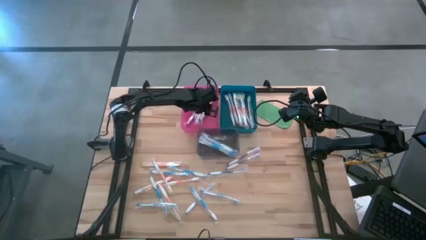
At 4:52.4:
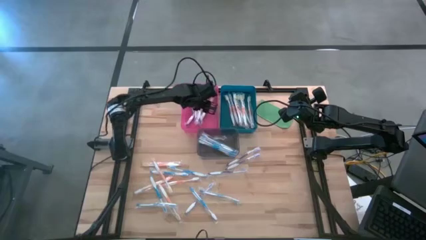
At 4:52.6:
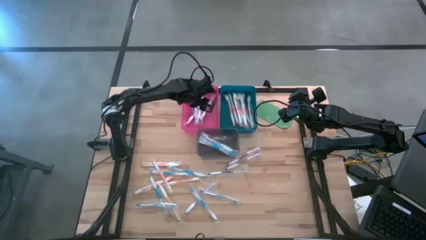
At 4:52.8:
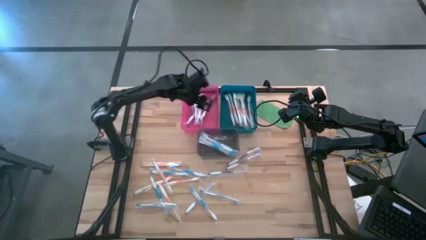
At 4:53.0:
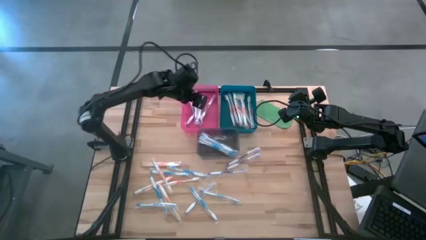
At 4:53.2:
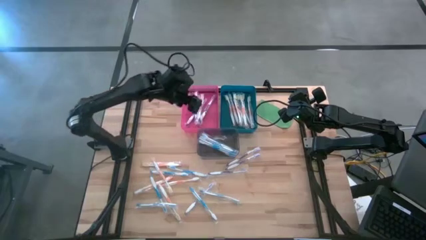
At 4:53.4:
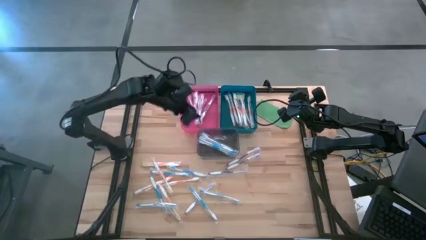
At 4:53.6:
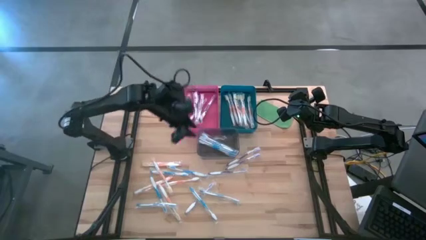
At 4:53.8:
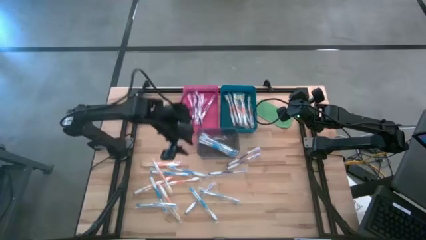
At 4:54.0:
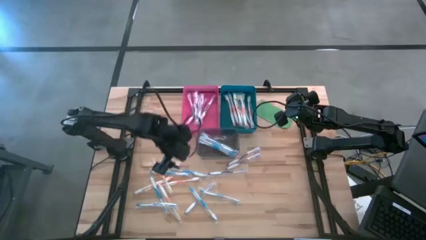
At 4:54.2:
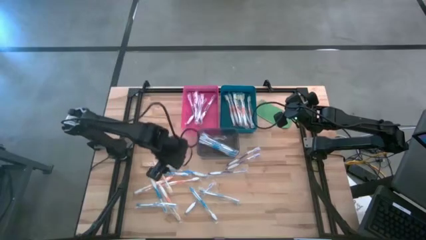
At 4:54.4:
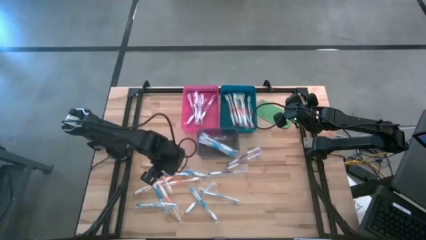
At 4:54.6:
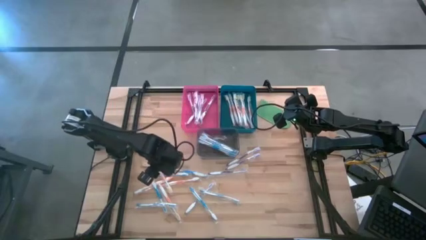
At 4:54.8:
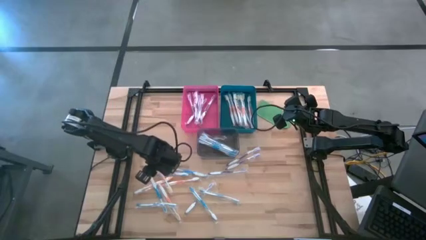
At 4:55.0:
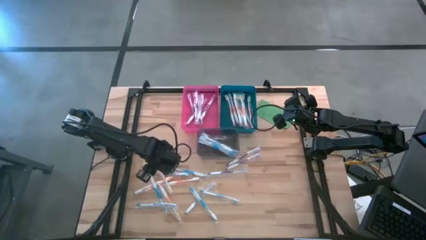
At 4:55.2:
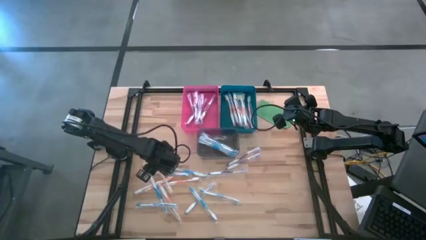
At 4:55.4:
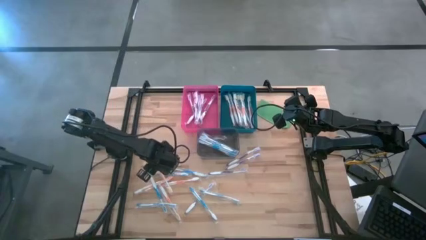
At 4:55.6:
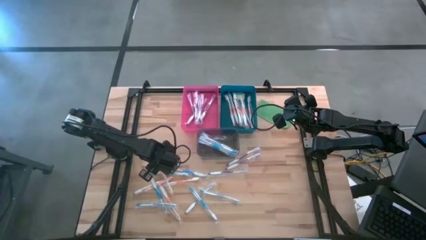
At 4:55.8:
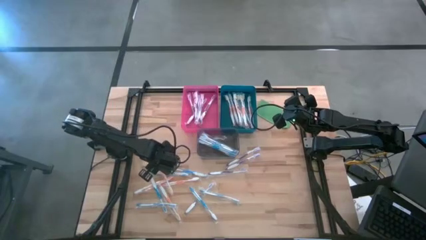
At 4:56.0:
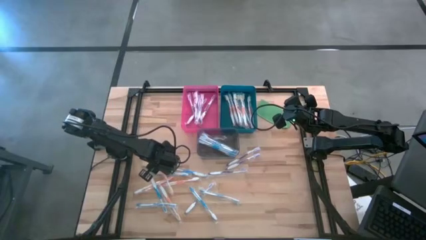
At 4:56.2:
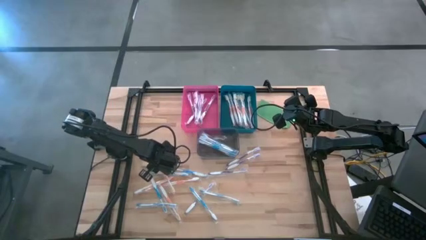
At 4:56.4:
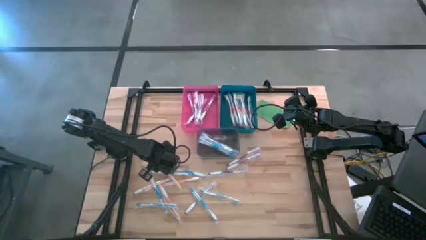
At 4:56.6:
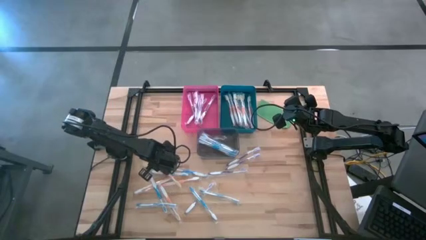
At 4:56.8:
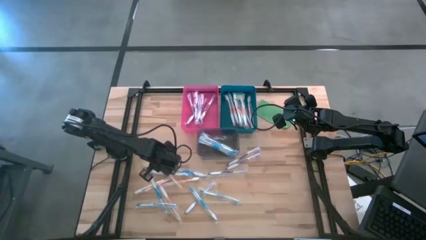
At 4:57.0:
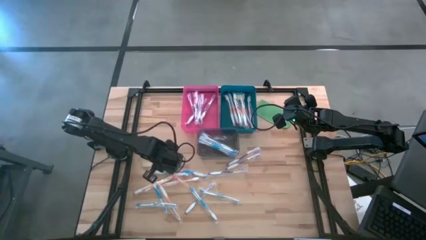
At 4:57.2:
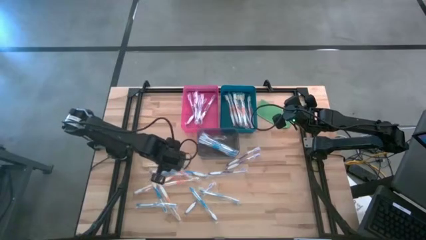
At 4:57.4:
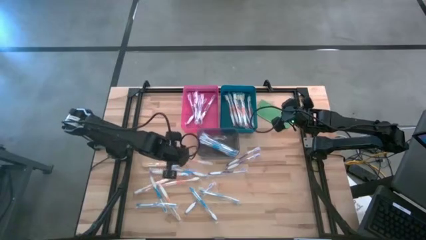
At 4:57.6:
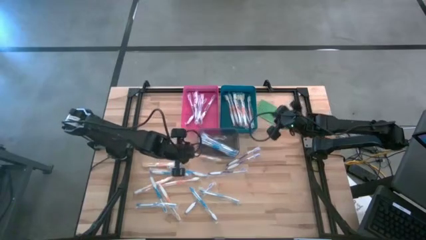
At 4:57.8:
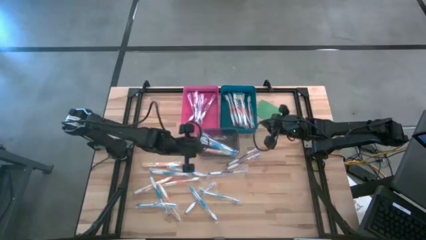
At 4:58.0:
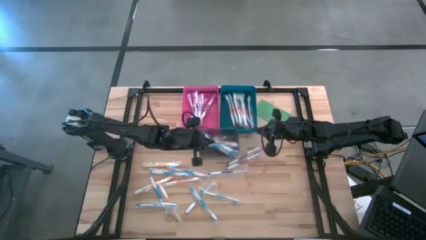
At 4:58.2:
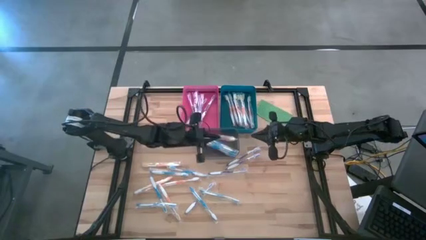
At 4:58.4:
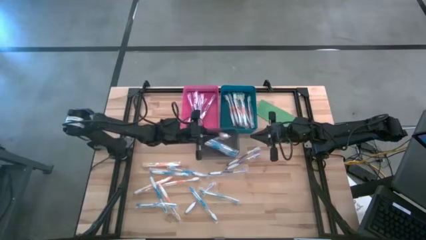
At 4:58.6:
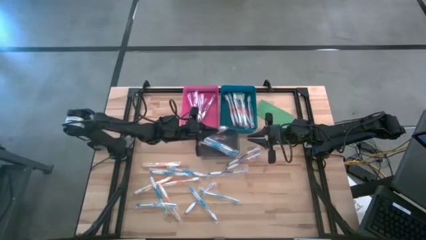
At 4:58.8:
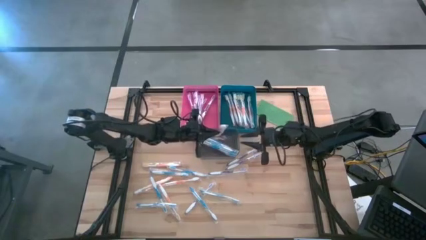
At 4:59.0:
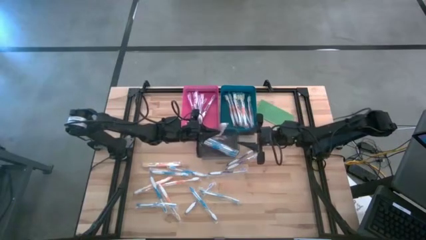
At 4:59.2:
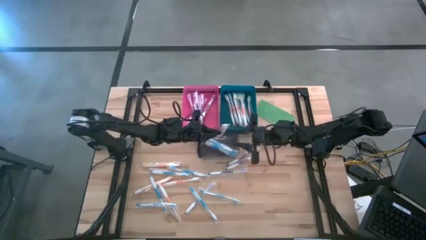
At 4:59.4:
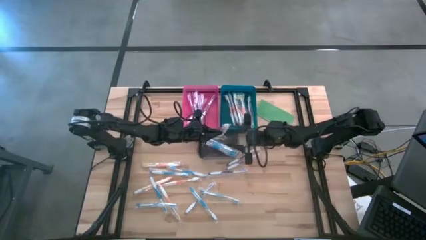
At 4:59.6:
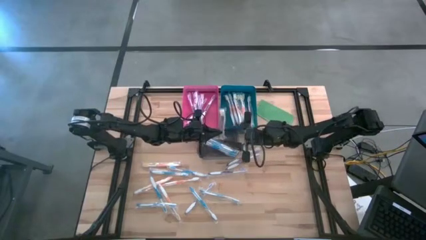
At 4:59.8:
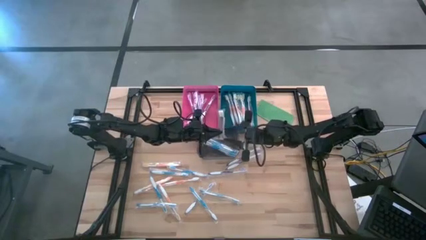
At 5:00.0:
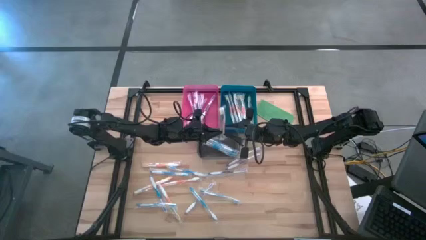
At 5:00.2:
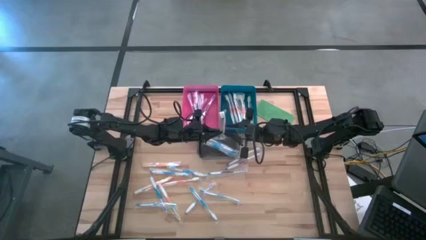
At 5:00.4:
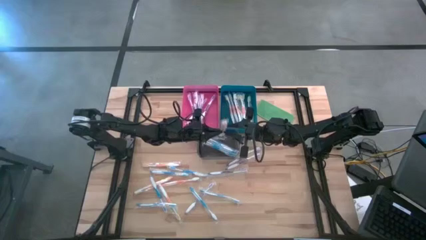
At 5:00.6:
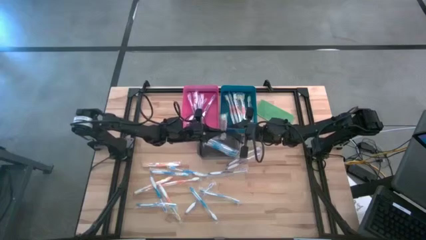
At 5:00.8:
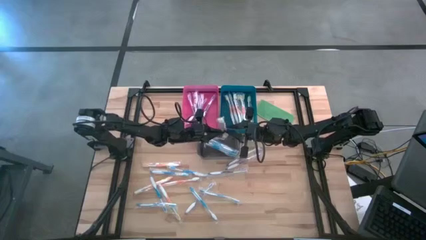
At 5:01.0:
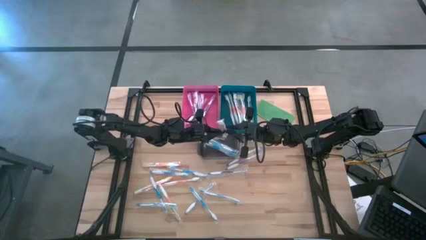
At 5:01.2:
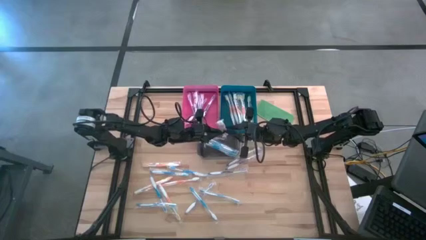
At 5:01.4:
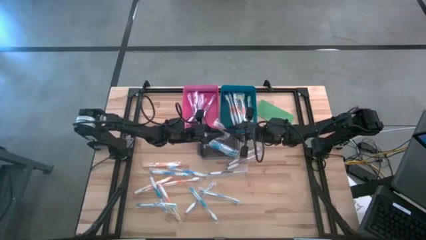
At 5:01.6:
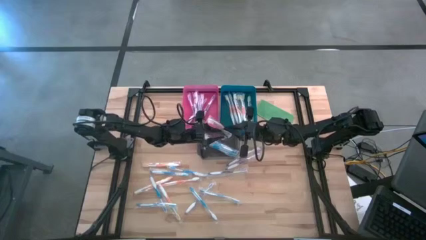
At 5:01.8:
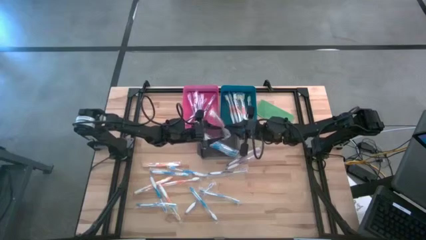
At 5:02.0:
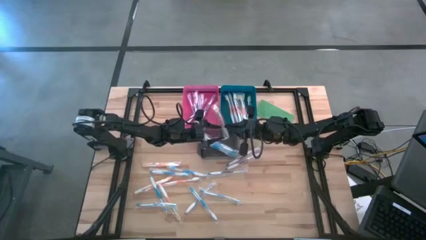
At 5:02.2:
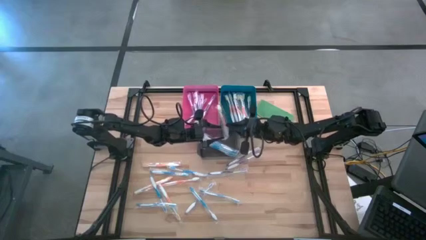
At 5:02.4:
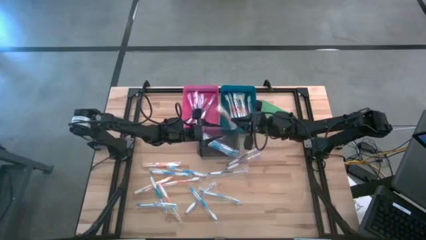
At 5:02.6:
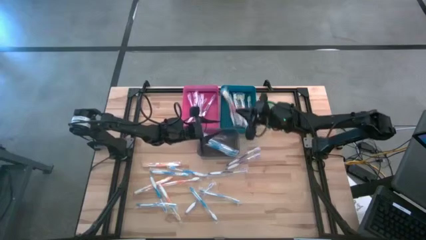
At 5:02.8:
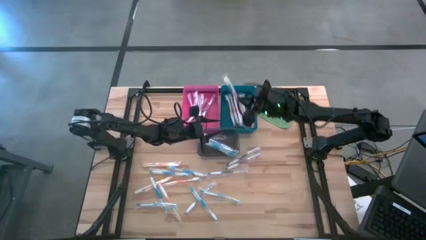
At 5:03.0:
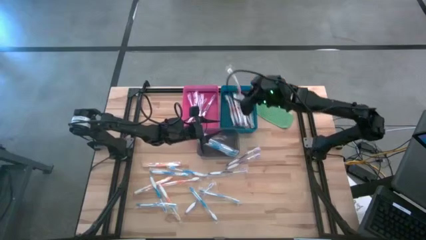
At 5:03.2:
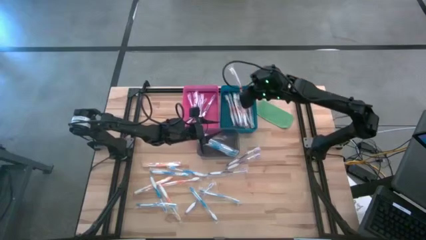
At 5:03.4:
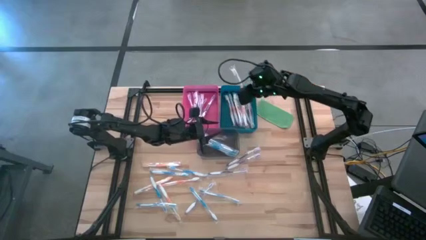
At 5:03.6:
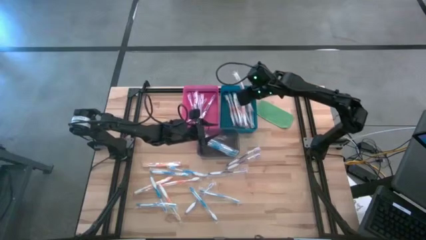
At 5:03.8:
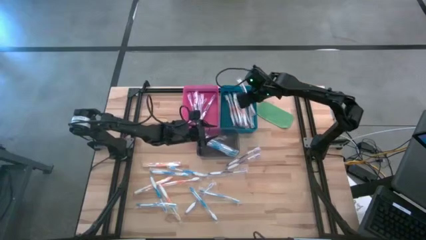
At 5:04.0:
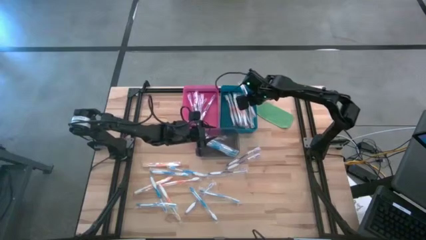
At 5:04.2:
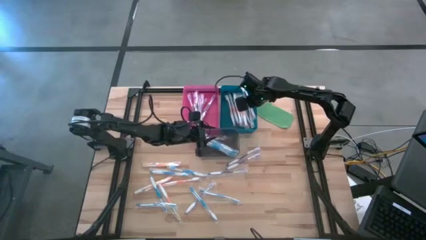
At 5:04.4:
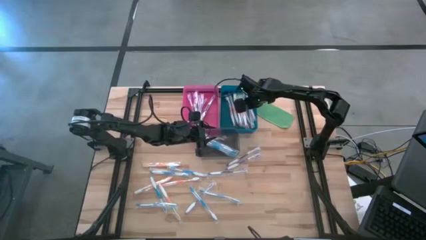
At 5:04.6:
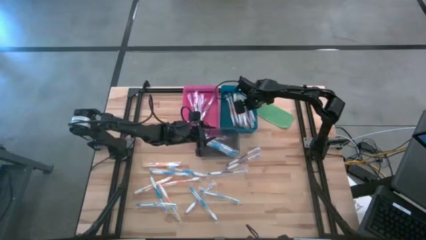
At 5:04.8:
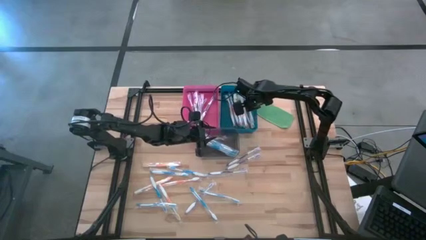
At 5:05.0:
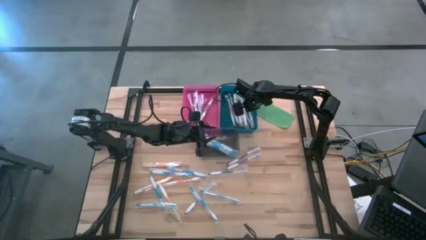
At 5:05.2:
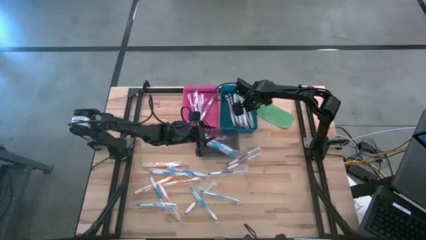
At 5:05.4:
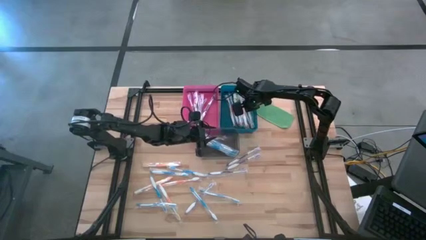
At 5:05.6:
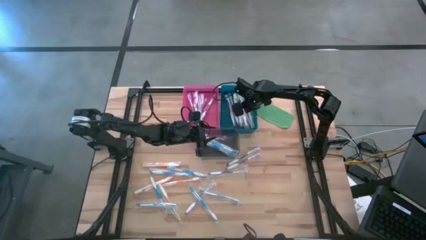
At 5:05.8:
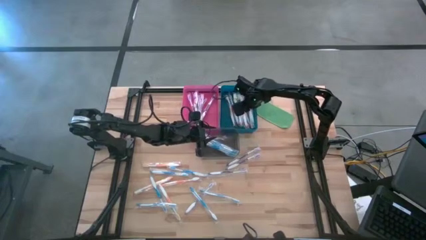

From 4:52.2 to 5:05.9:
Task: Pick & Place Toothbrushes
Put the orange toothbrush into the blue bin

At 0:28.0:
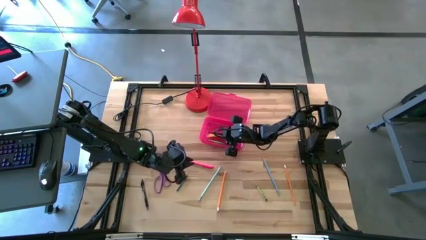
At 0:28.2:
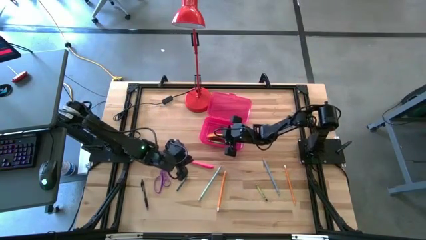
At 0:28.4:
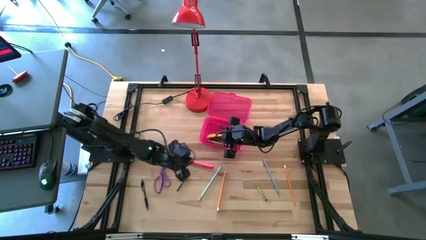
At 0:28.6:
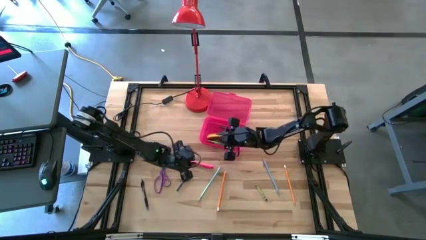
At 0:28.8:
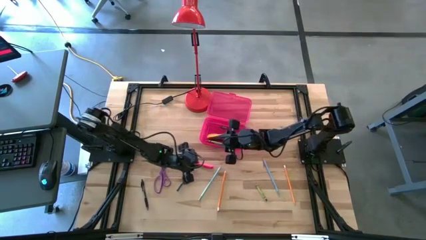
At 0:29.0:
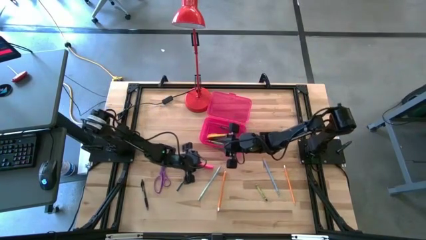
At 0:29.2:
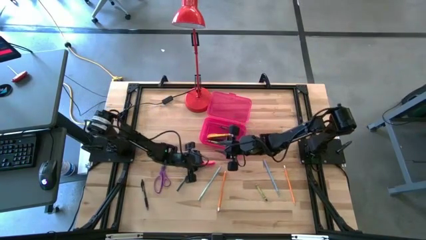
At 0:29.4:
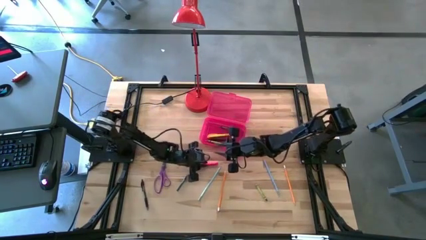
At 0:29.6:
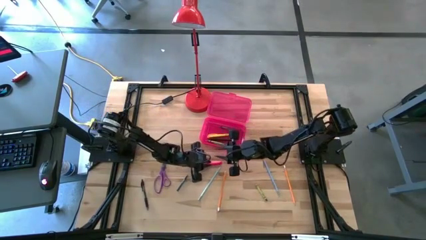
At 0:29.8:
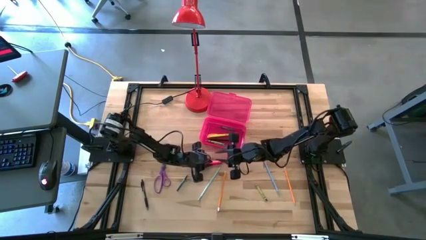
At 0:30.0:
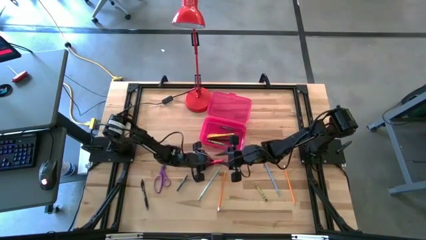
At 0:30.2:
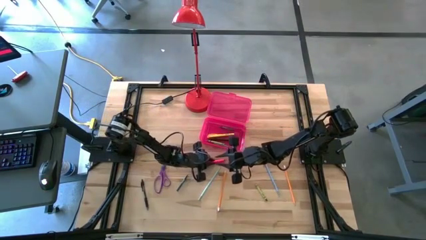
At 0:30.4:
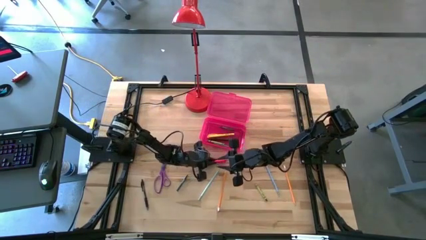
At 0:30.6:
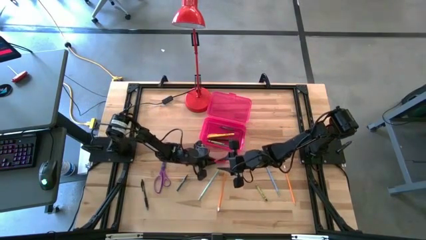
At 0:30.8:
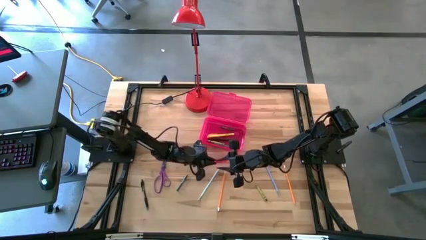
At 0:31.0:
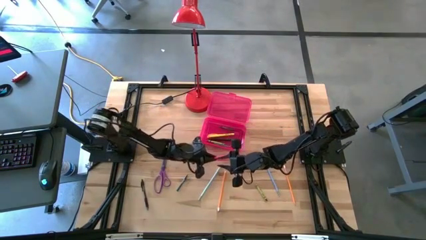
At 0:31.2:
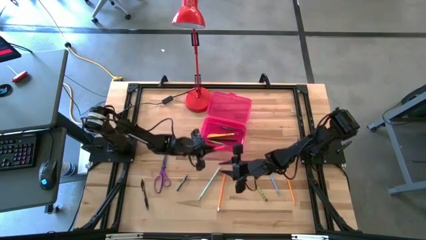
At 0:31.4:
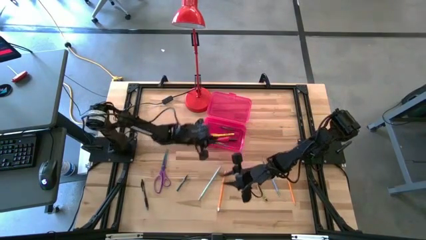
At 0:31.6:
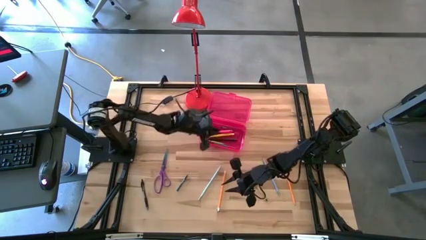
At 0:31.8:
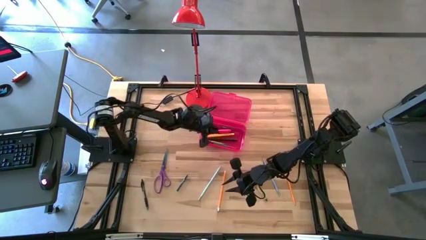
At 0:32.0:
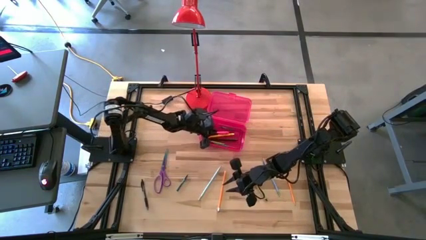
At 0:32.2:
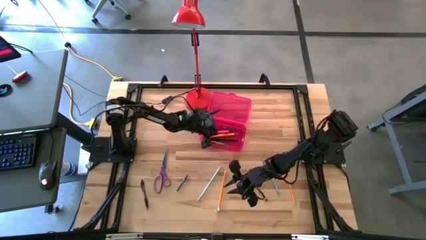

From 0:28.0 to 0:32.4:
Task: Pick & place school supplies into a supply box
Put the pink pen into the pink supply box
